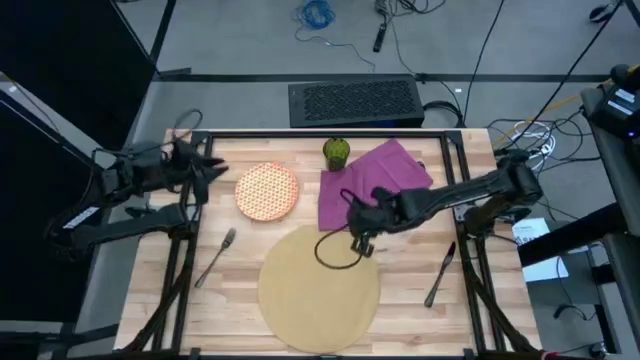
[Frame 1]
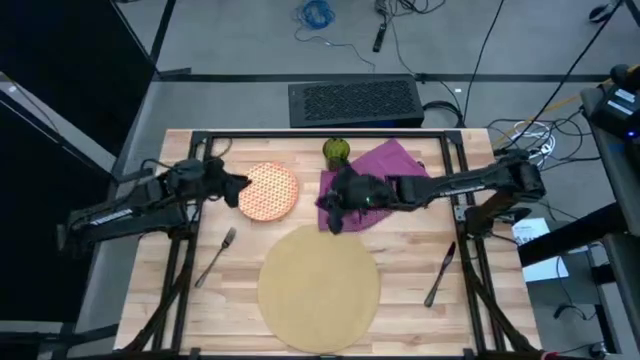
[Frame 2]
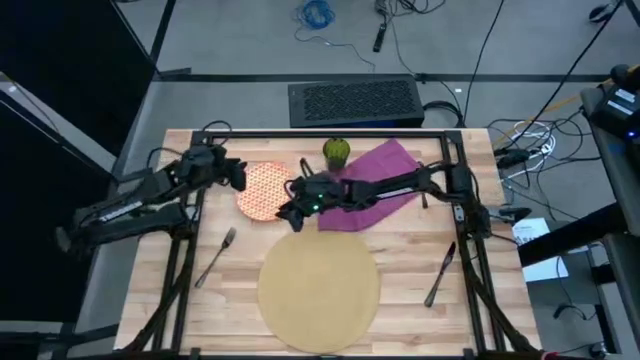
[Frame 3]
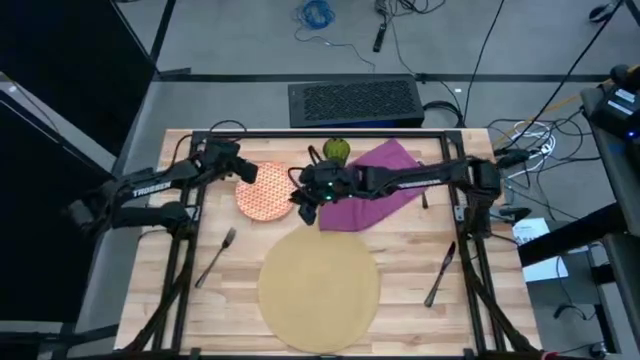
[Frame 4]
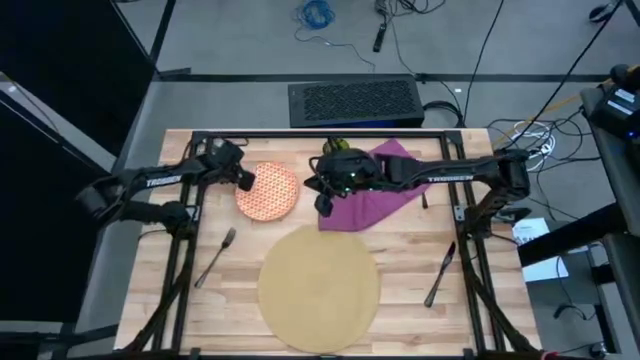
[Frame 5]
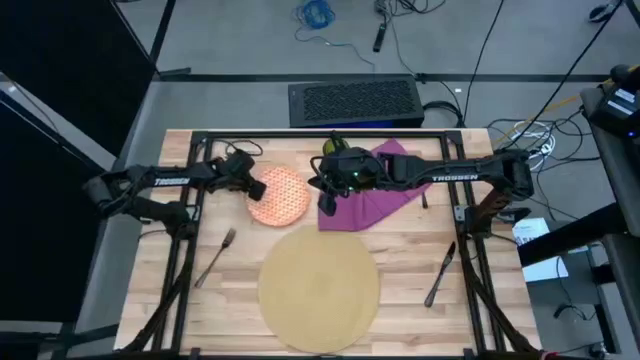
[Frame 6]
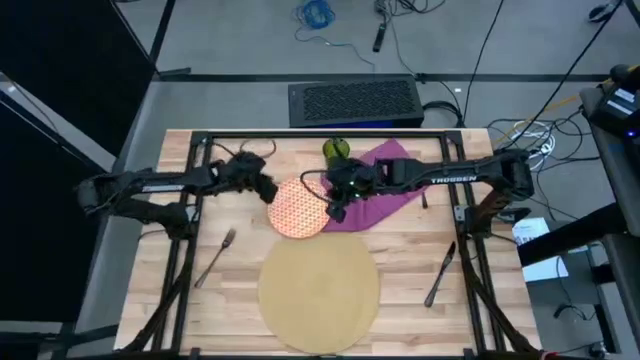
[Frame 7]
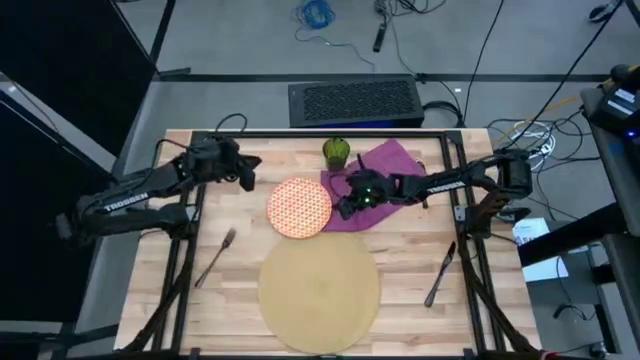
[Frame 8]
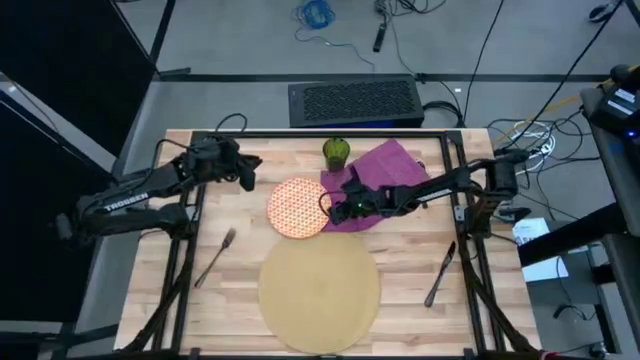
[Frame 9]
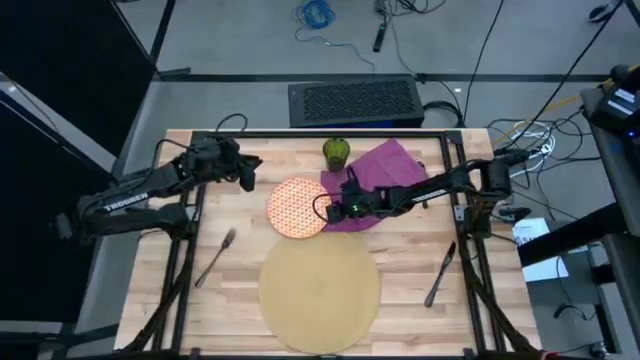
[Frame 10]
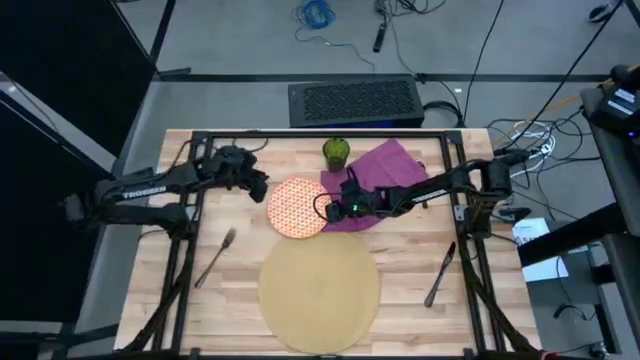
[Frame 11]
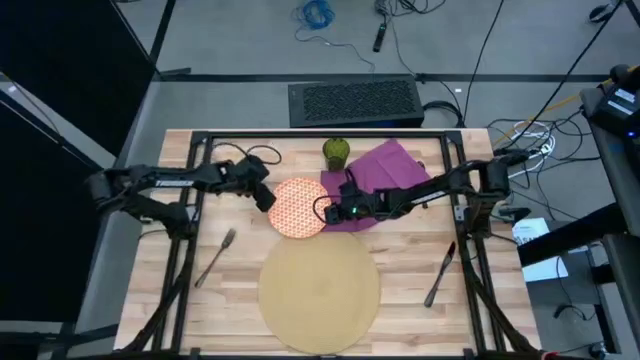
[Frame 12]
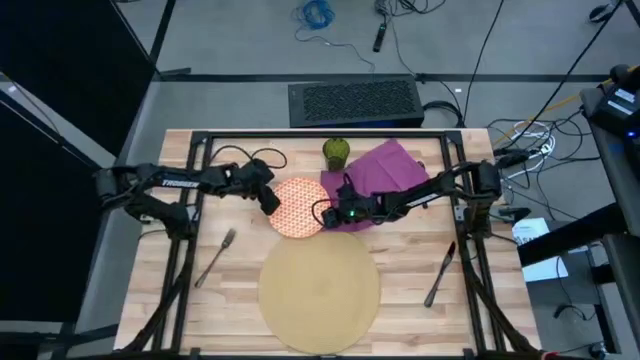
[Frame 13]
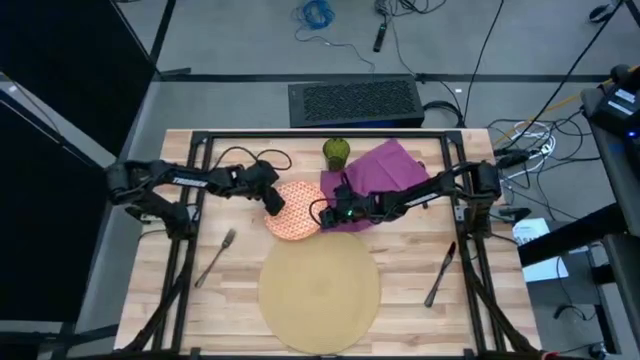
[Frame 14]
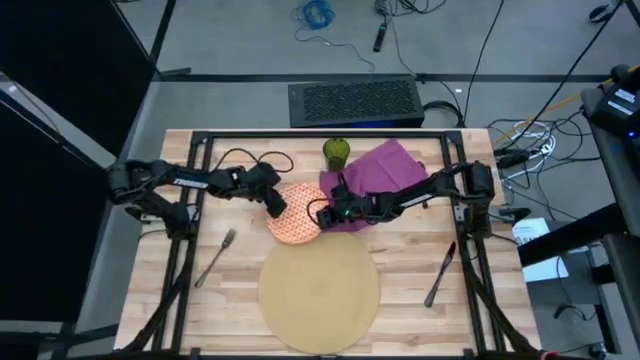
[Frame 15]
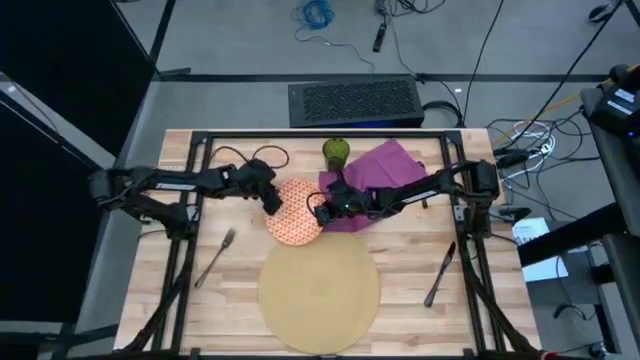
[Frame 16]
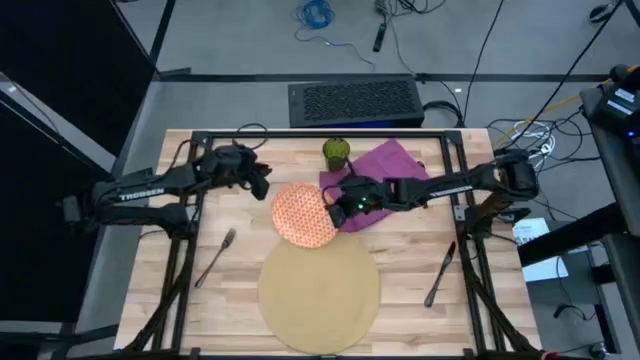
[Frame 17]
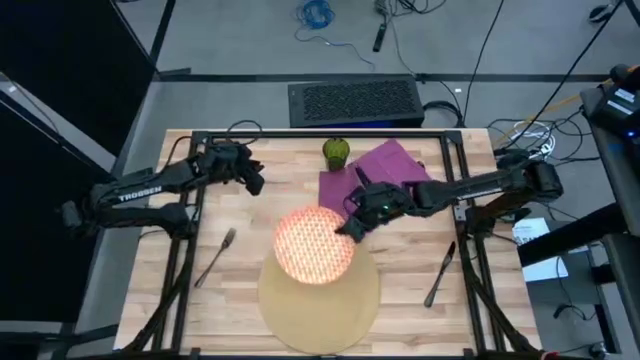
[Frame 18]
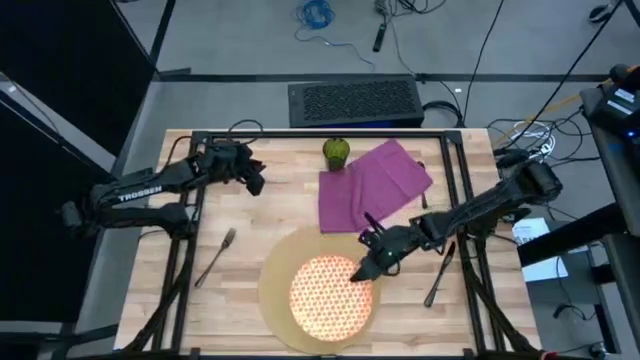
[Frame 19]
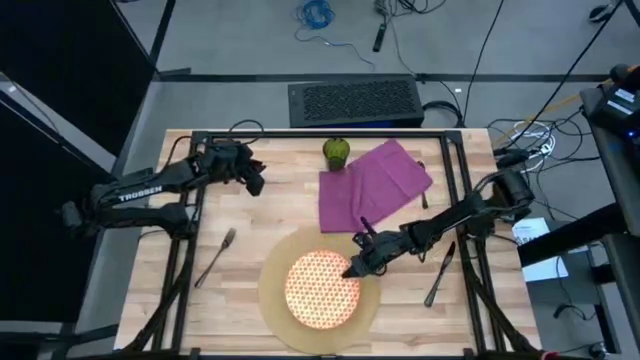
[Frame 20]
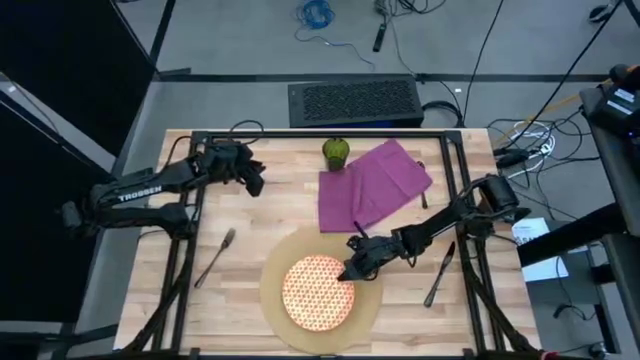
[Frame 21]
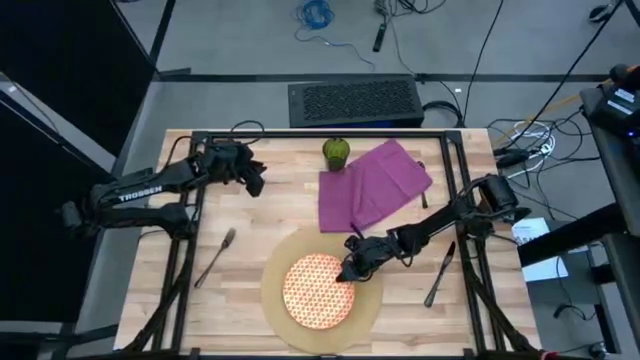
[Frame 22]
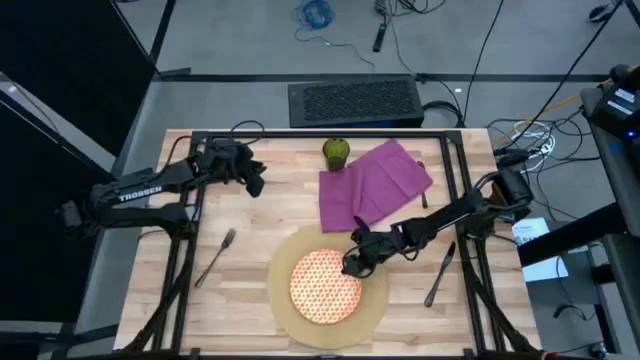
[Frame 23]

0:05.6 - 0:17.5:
Task: Set table place
Put the orange plate on the brown placemat

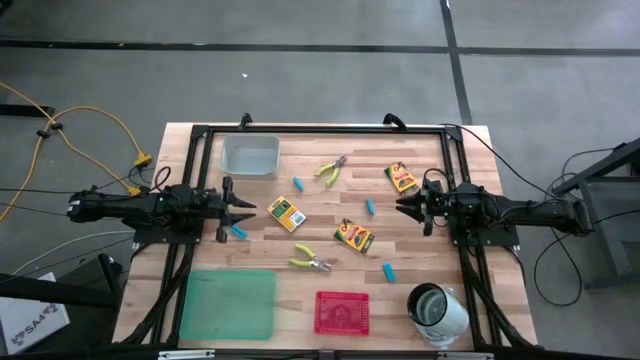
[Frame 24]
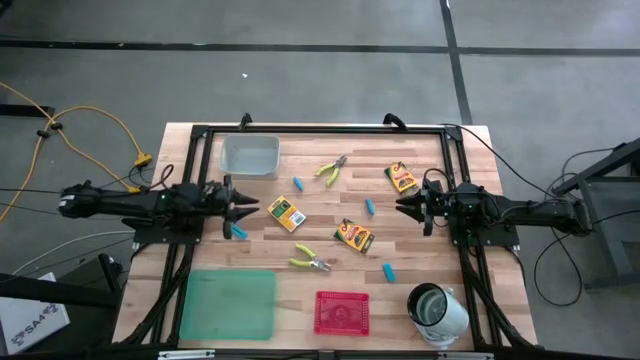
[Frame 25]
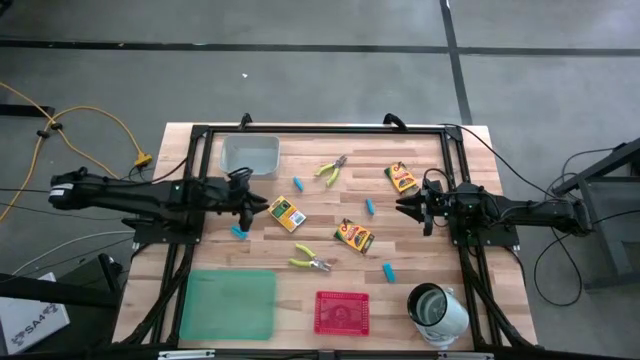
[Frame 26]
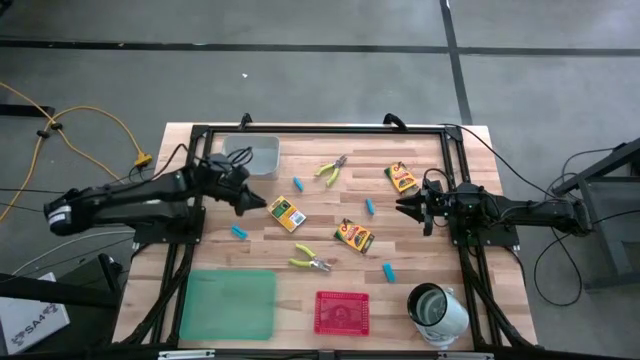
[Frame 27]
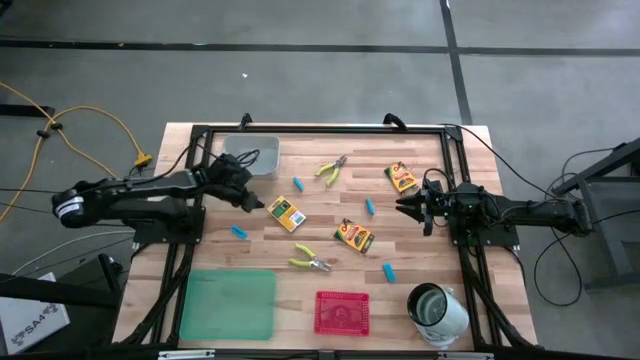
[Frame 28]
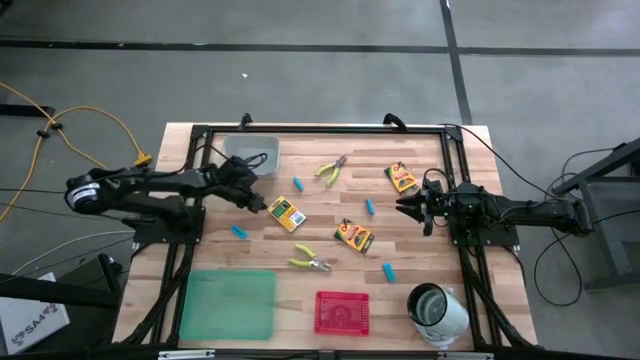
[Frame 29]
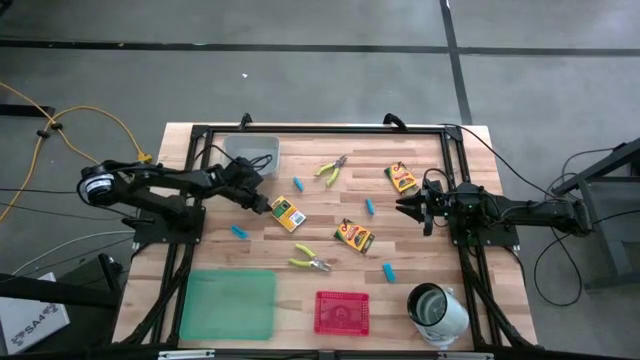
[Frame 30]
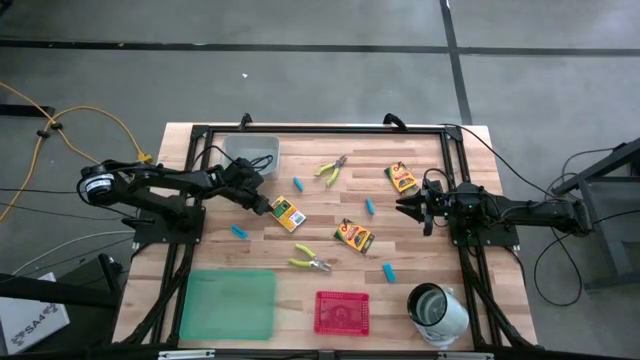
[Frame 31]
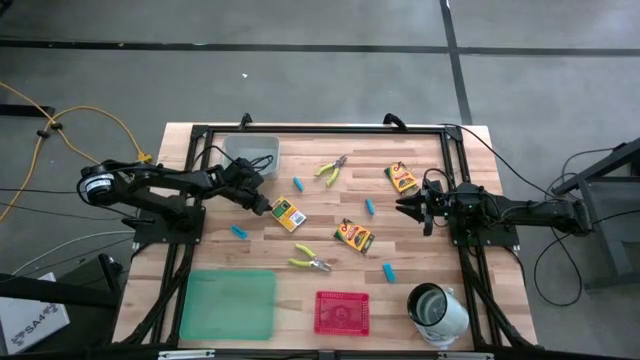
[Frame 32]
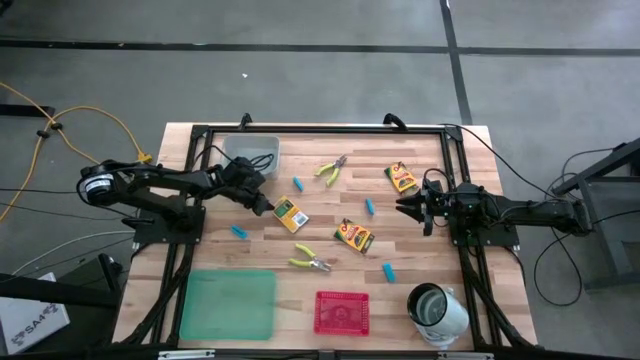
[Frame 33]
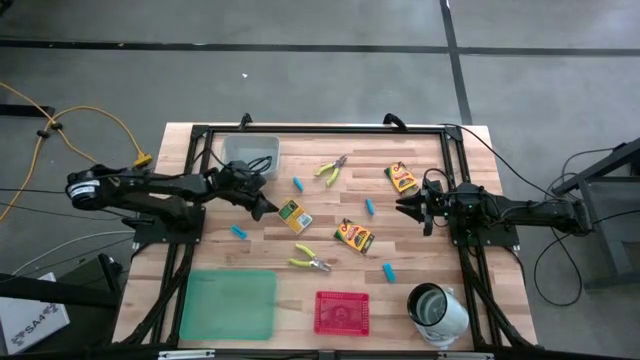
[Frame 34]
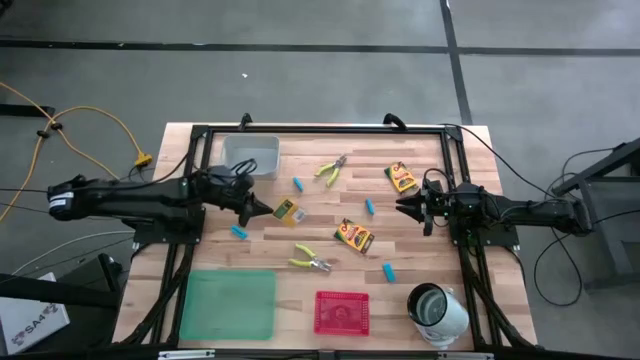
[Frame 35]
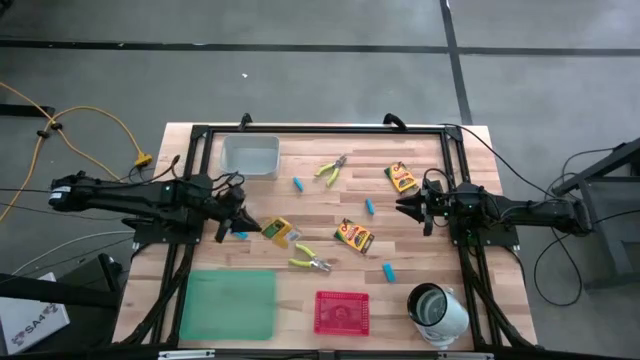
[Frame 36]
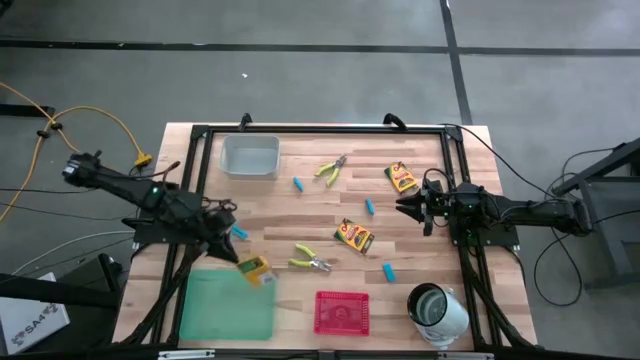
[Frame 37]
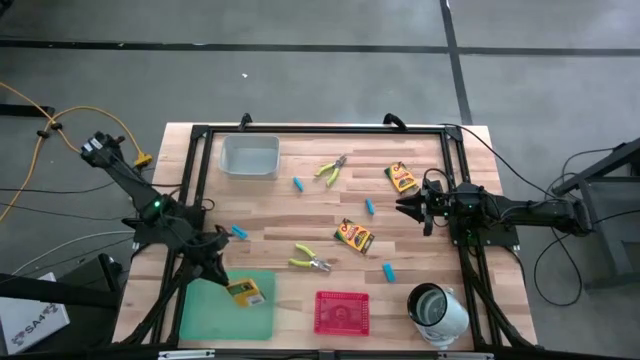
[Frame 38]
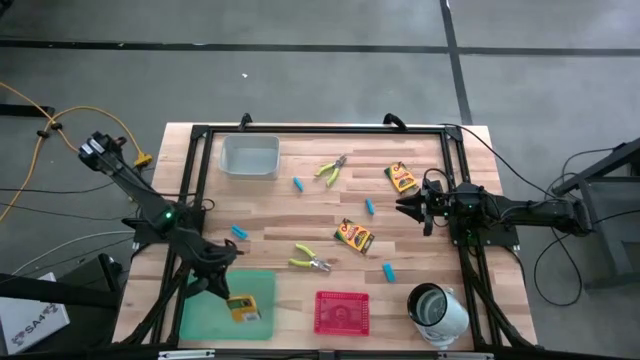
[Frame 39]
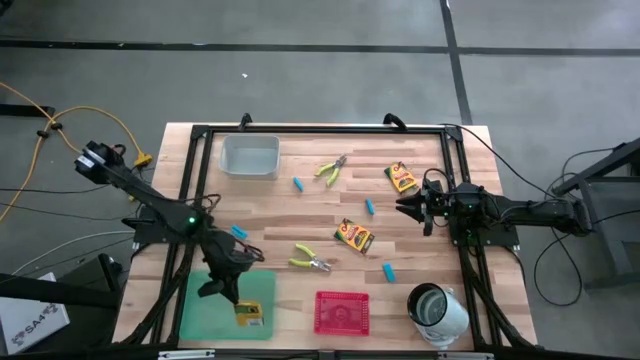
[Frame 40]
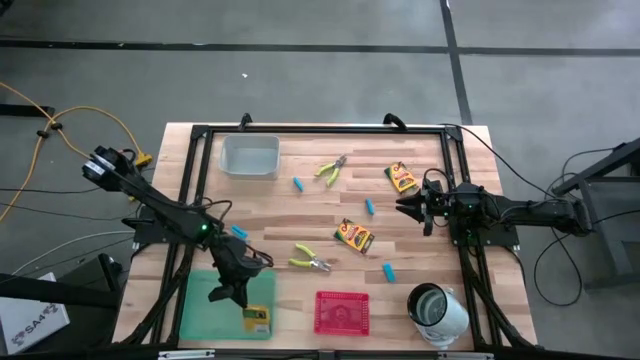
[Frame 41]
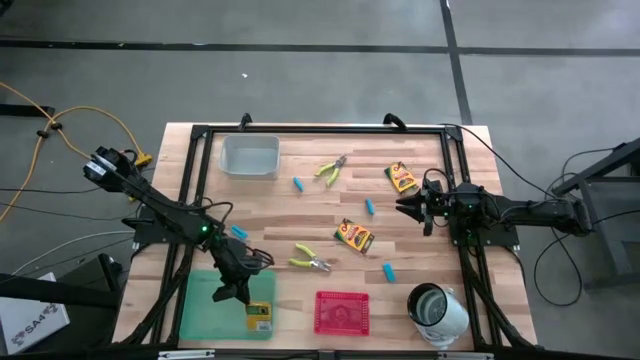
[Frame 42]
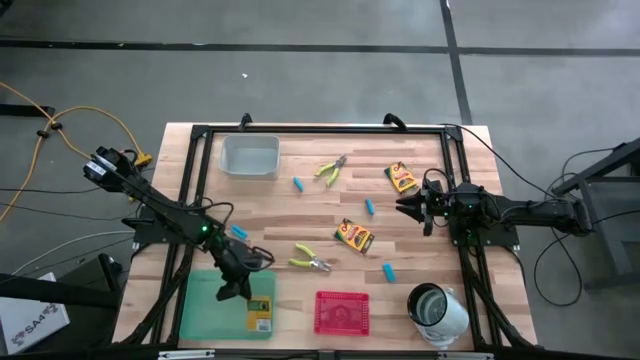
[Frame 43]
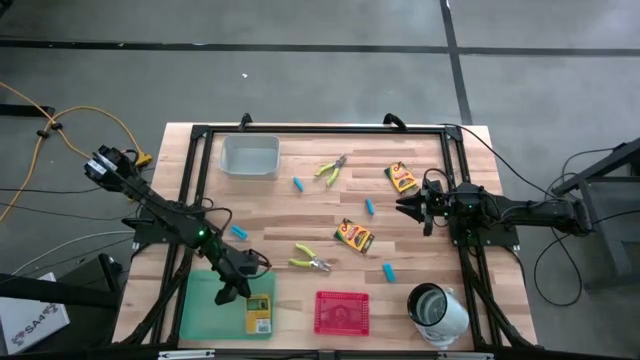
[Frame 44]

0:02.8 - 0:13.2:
Task: Pick & Place School Supplies
Put the yellow crayon box into the green bin
